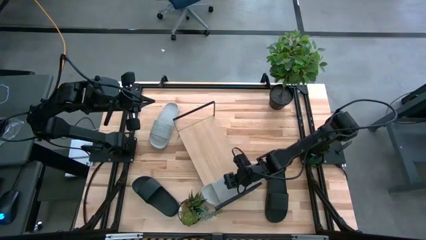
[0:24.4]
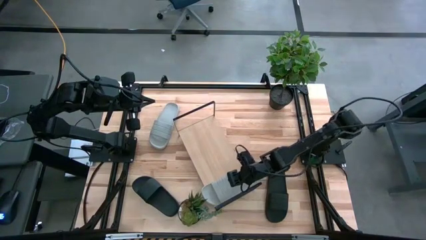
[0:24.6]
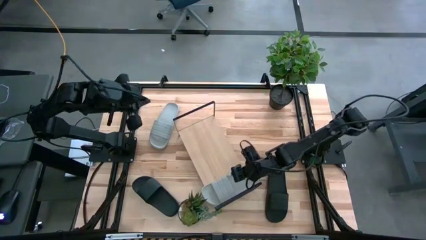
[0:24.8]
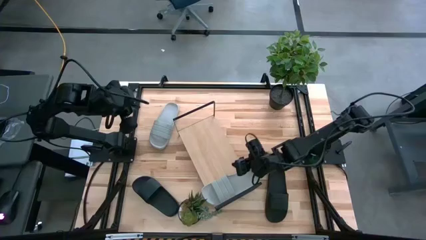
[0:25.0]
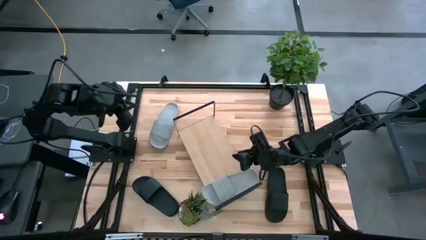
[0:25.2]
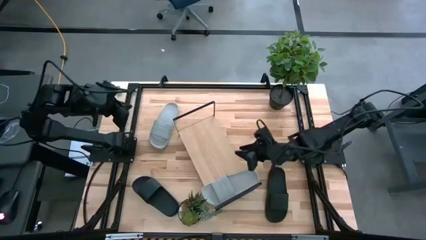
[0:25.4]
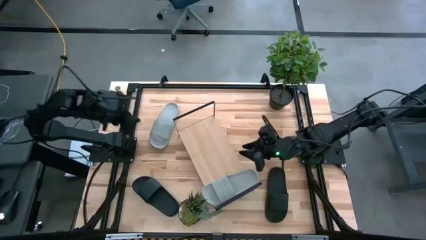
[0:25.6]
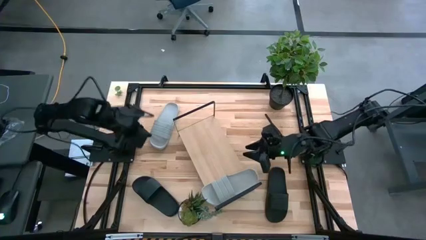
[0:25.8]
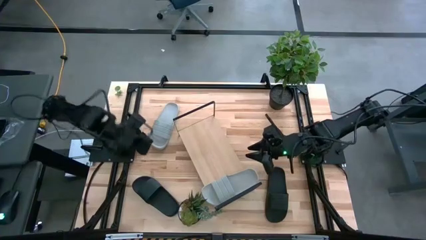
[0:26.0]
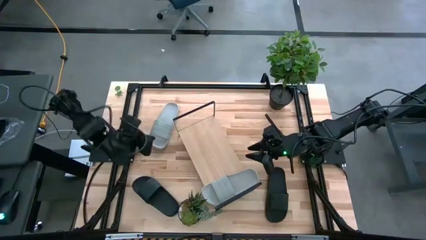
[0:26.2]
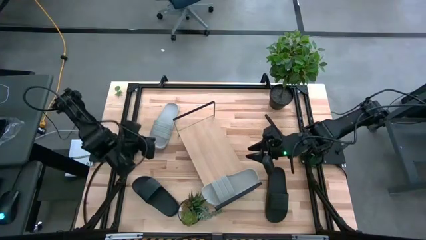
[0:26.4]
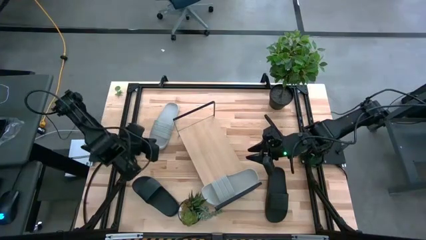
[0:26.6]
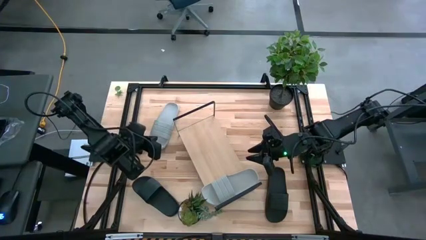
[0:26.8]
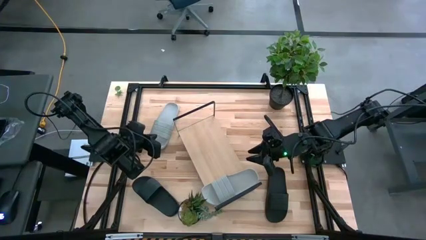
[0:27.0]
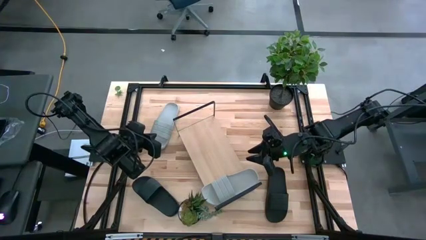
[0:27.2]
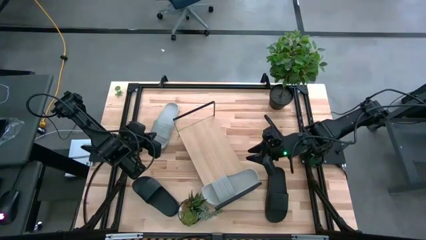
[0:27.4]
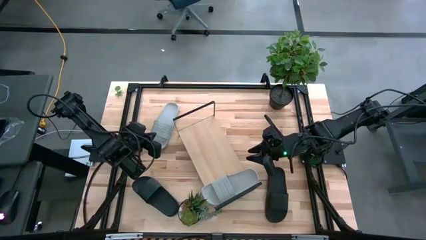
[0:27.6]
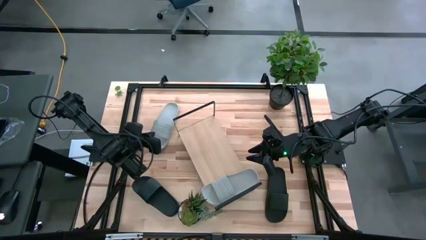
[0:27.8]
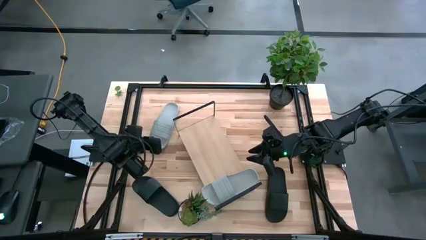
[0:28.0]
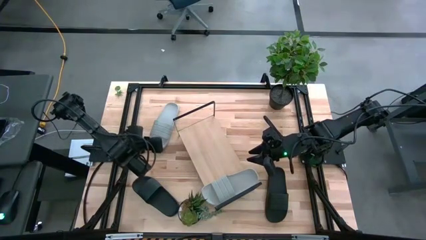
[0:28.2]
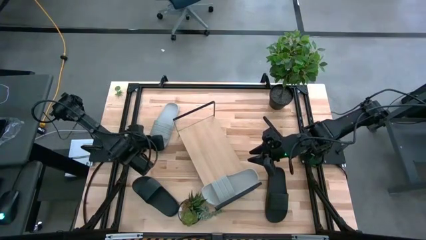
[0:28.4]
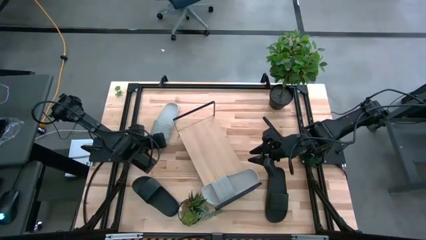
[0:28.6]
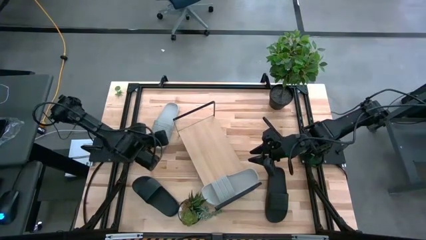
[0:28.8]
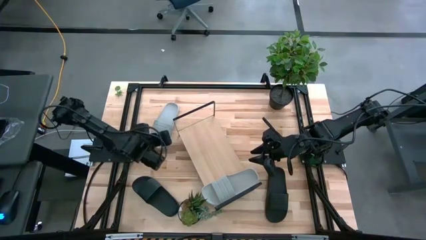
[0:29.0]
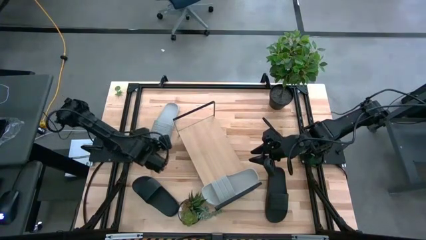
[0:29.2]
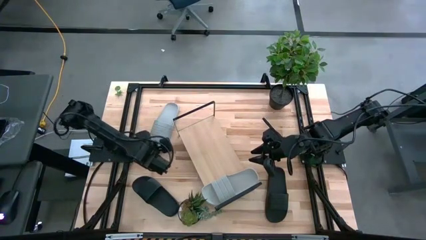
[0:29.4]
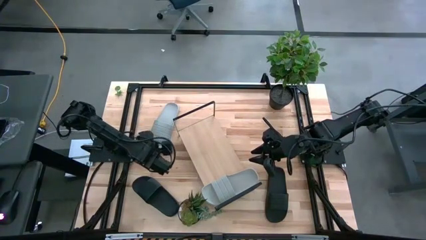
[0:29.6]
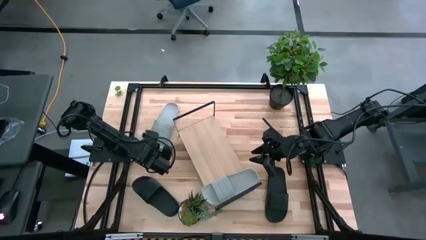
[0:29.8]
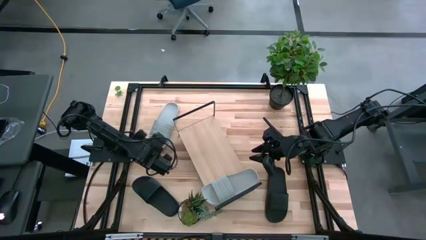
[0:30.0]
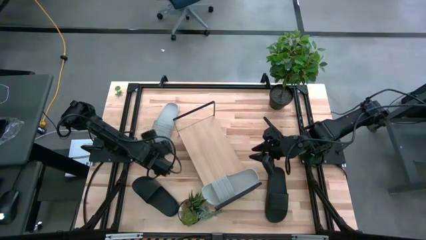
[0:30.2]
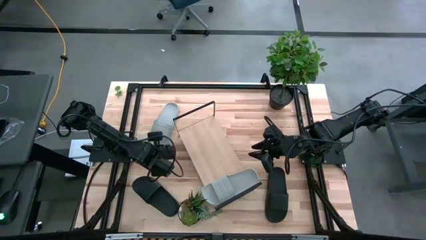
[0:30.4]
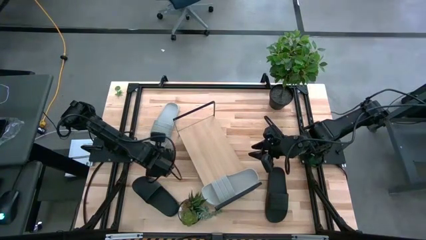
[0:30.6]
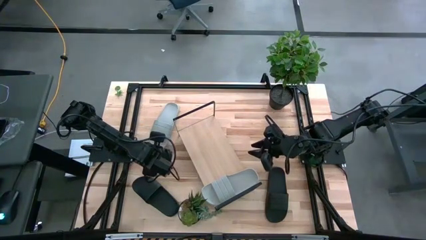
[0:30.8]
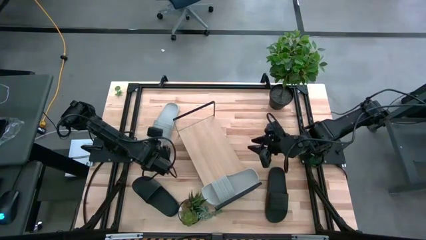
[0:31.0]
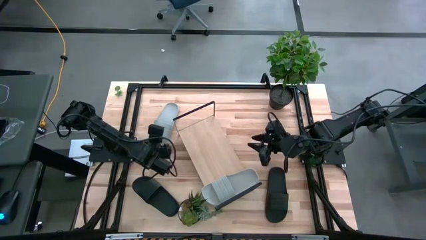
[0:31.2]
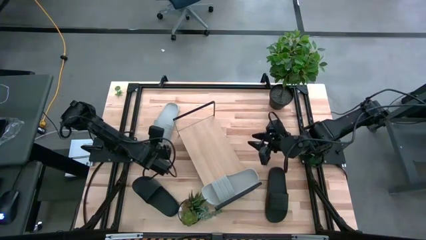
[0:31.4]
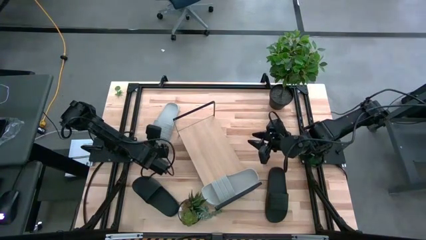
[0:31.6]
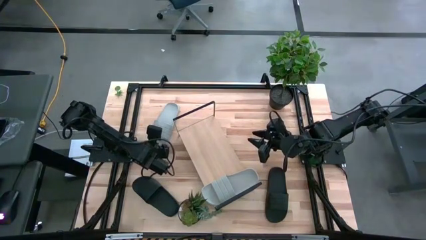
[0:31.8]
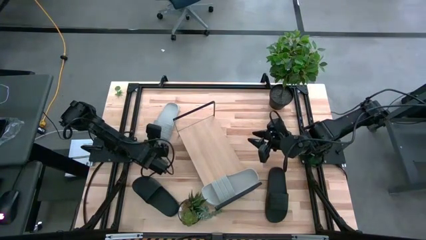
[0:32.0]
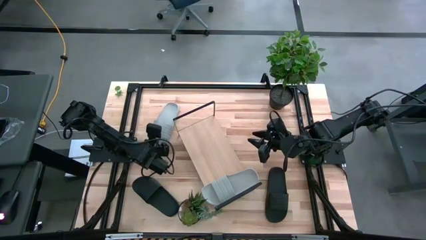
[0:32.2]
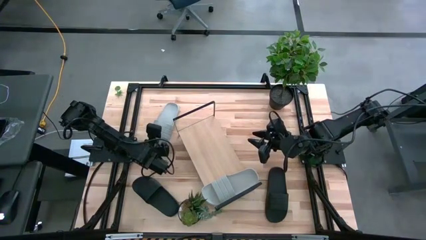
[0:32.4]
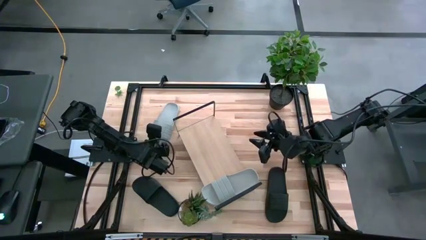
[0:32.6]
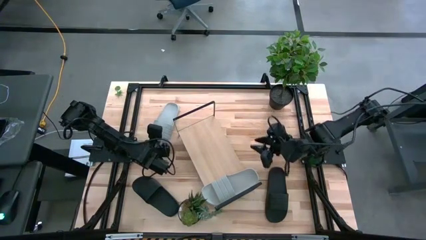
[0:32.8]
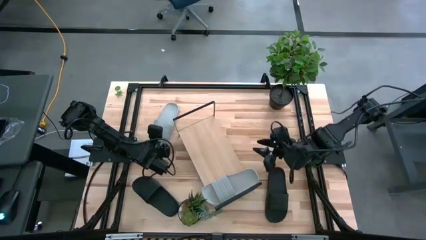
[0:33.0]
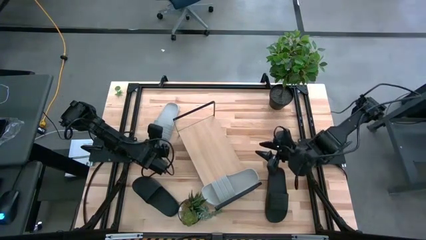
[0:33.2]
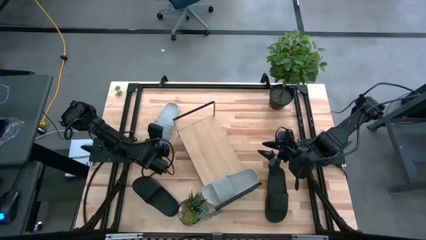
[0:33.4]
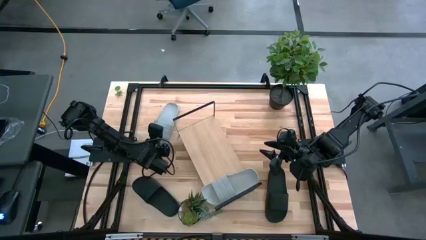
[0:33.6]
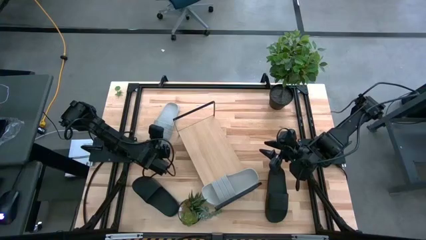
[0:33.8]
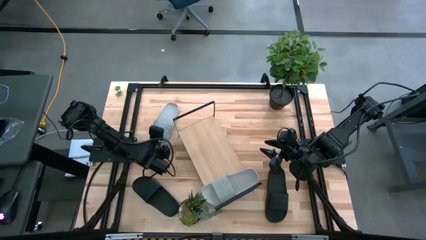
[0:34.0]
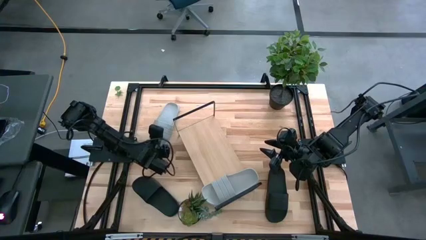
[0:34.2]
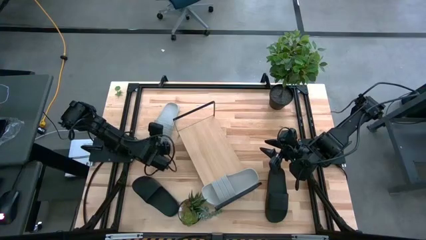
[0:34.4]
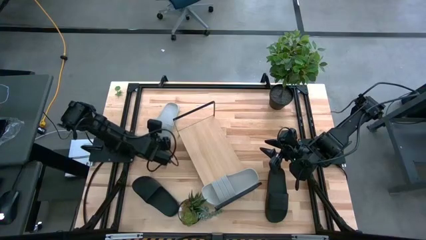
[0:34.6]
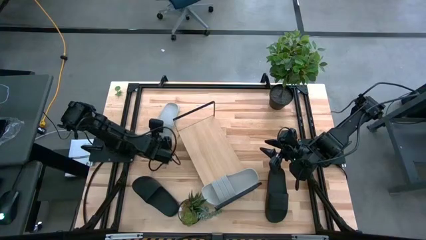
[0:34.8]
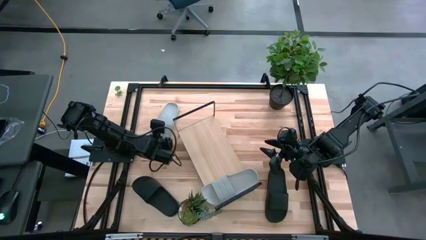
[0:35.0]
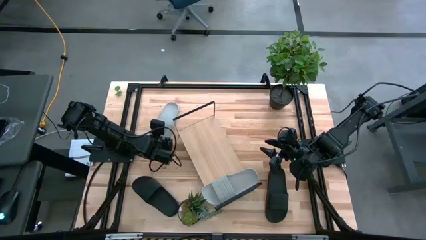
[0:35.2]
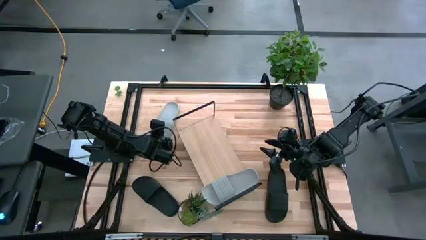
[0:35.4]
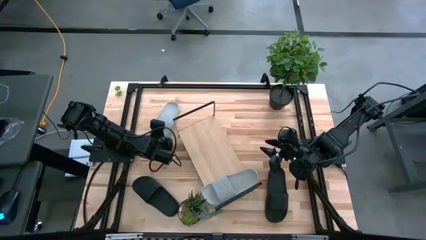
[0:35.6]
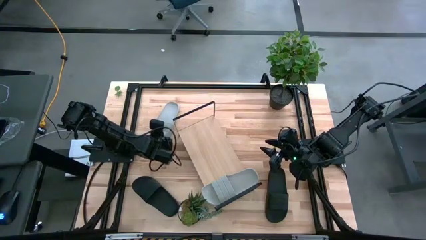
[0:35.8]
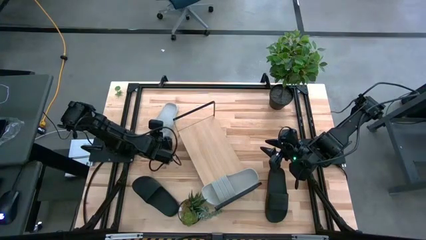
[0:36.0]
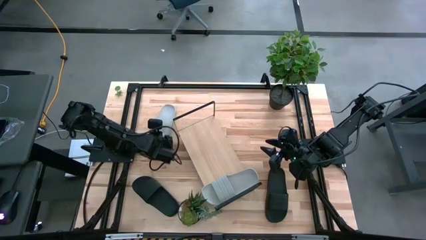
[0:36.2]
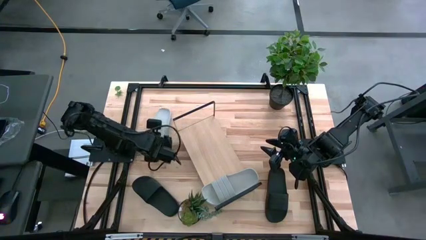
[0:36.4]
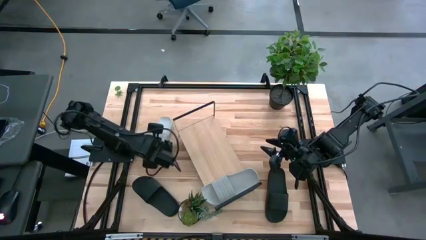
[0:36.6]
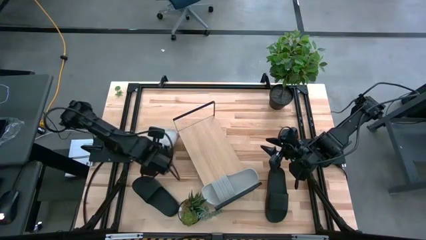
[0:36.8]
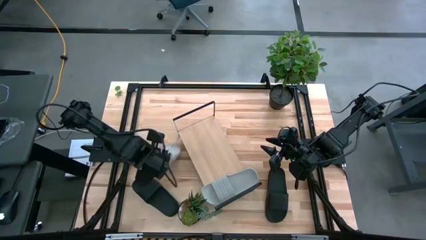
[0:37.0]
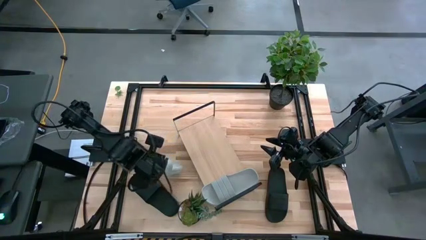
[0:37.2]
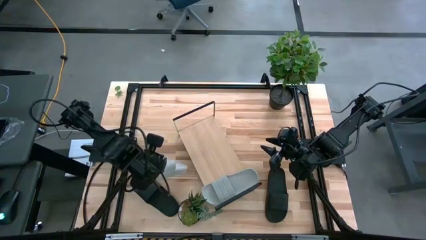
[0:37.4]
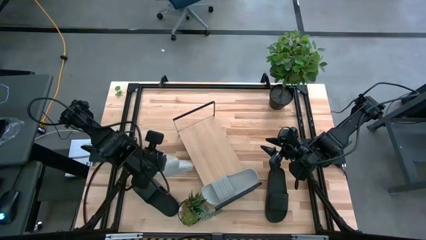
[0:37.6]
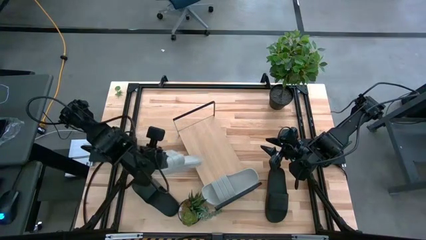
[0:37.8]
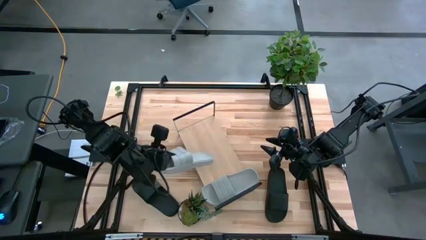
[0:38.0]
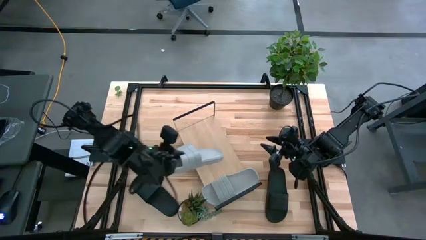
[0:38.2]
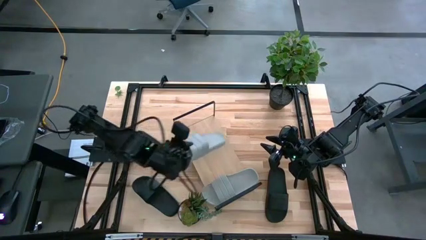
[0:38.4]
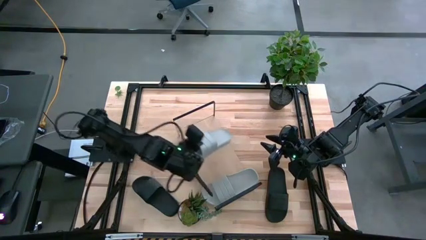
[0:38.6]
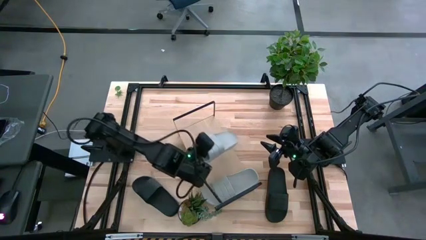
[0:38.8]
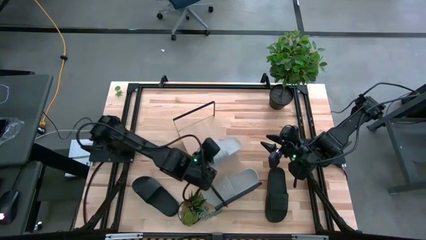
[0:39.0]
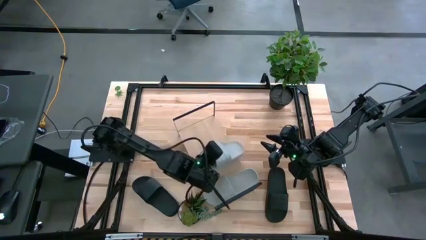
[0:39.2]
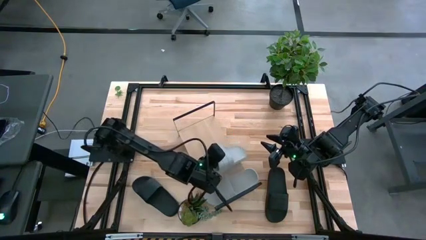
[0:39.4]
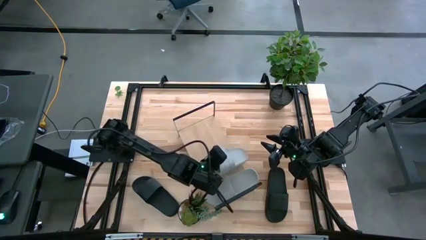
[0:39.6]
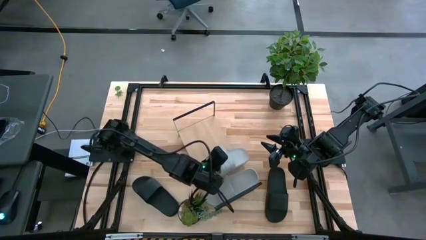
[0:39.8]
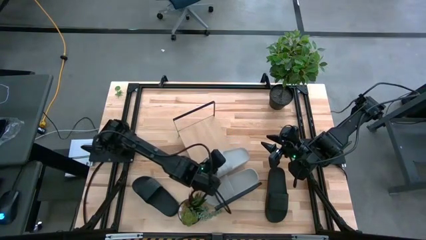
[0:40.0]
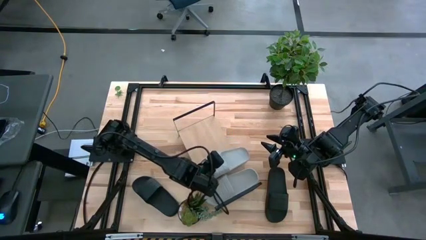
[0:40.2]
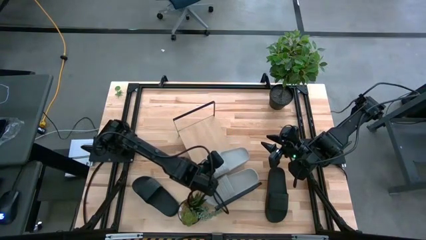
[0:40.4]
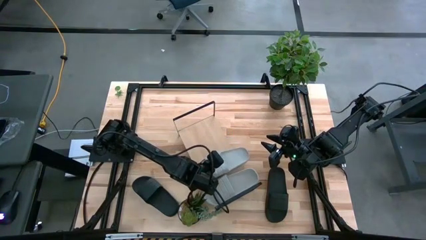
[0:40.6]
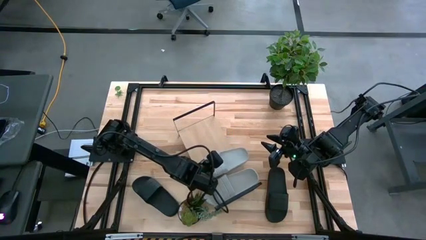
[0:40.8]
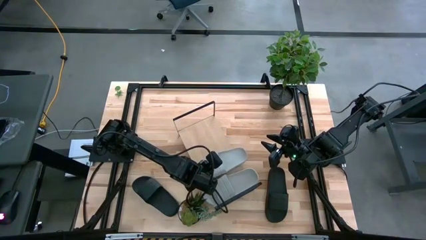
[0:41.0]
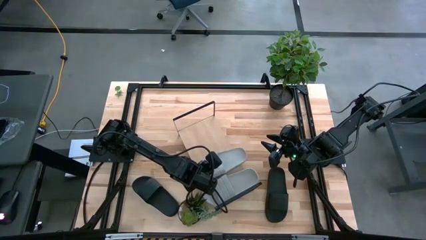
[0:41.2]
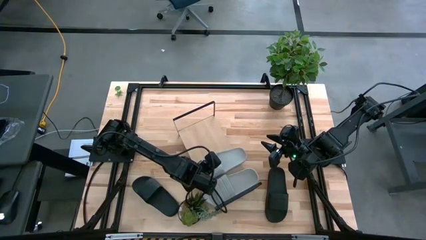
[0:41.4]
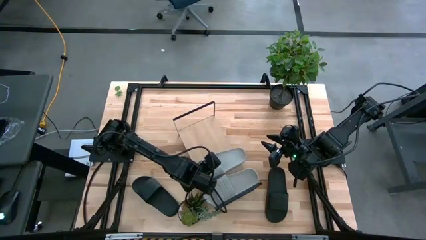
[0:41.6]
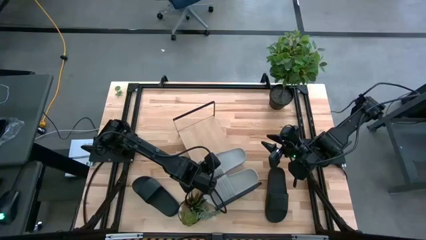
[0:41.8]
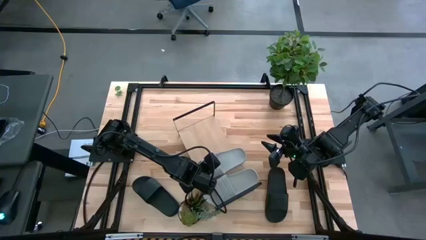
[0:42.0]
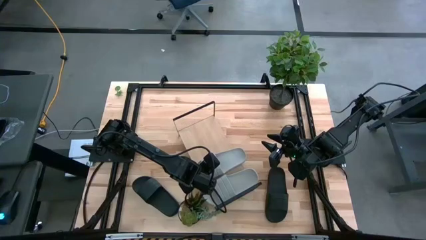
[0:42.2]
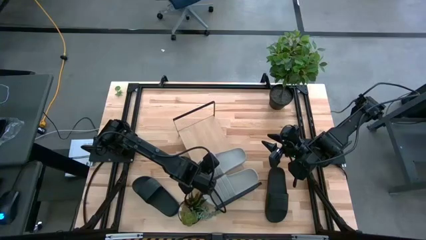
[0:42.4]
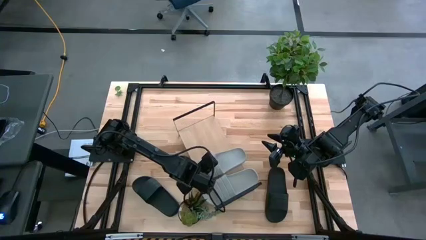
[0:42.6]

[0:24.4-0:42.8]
Task: Pick and place slides into the shelf
Put the grey slipper on the shelf
